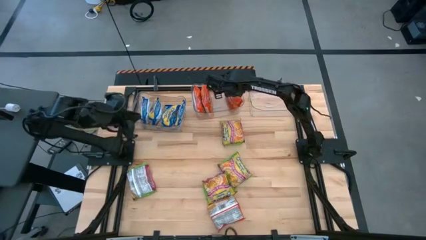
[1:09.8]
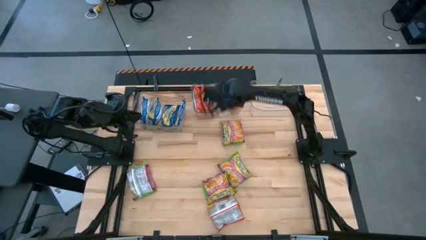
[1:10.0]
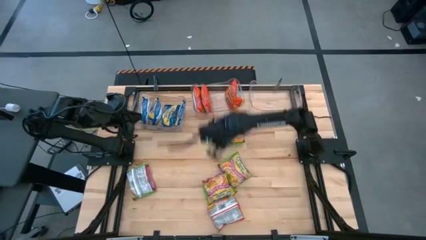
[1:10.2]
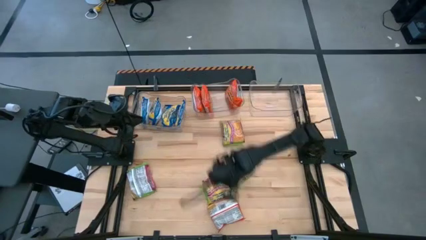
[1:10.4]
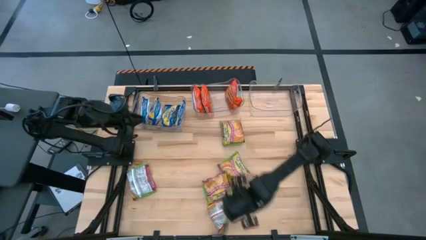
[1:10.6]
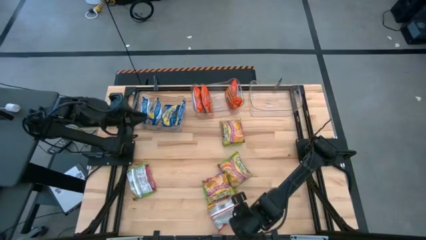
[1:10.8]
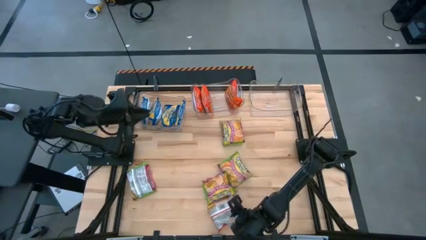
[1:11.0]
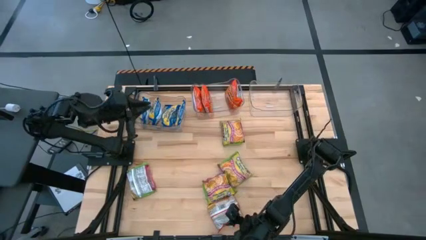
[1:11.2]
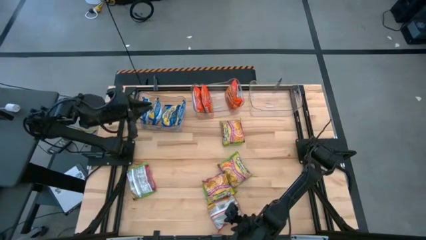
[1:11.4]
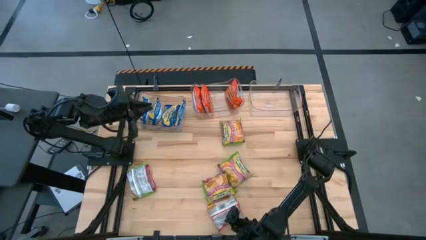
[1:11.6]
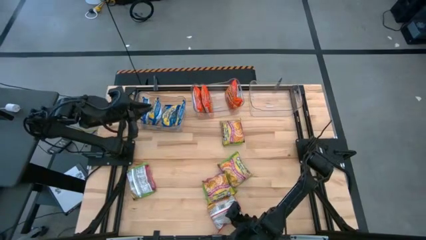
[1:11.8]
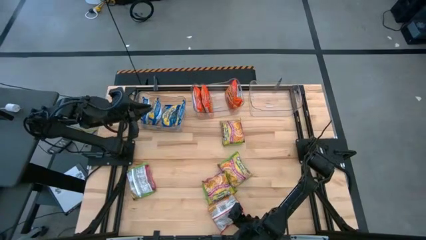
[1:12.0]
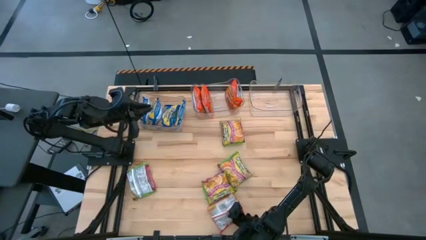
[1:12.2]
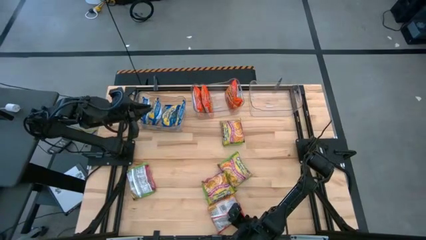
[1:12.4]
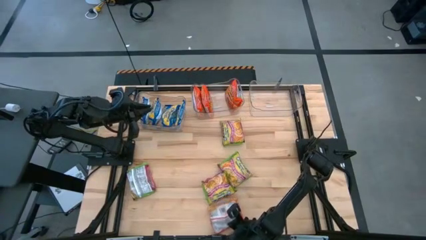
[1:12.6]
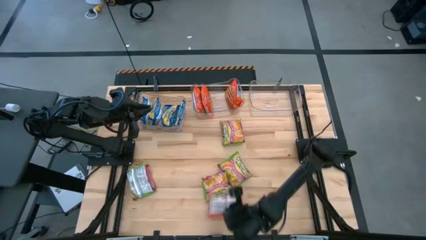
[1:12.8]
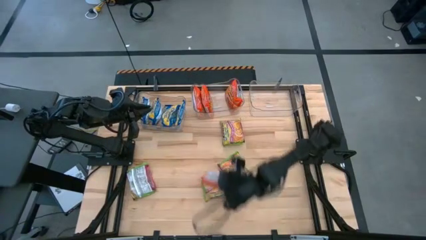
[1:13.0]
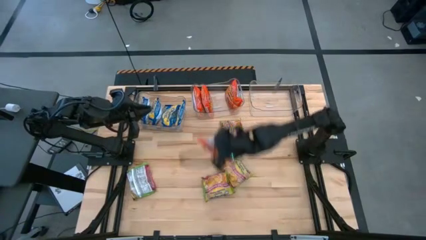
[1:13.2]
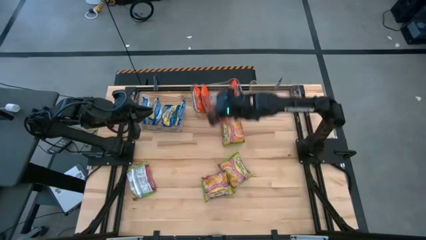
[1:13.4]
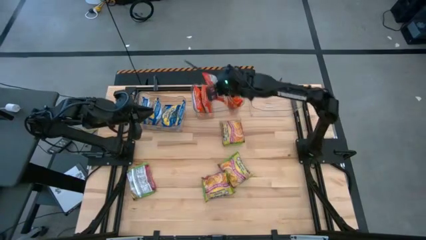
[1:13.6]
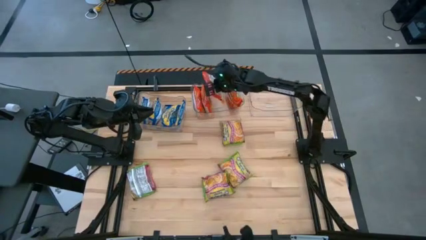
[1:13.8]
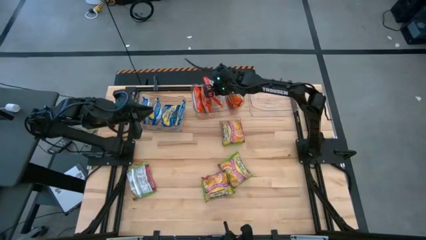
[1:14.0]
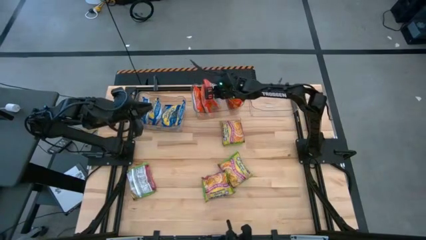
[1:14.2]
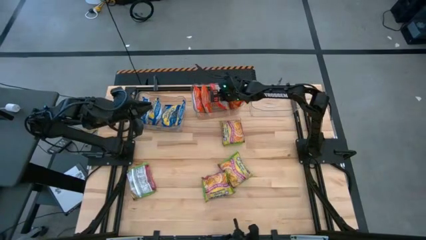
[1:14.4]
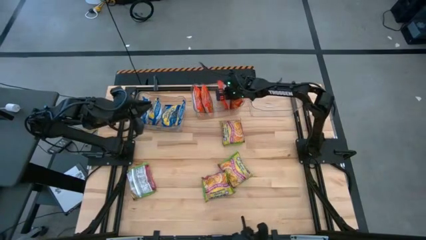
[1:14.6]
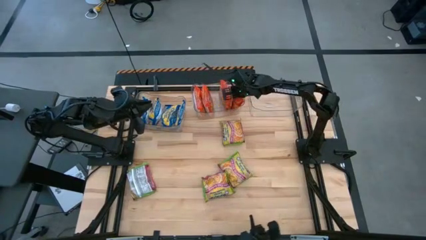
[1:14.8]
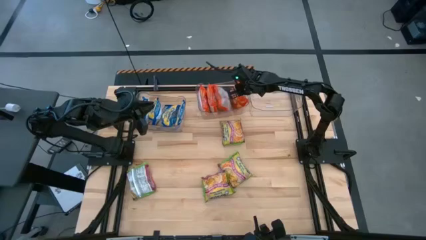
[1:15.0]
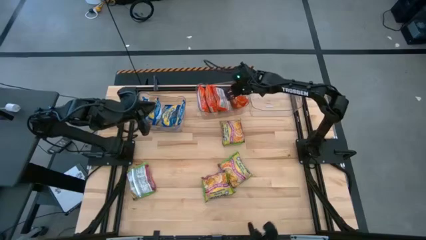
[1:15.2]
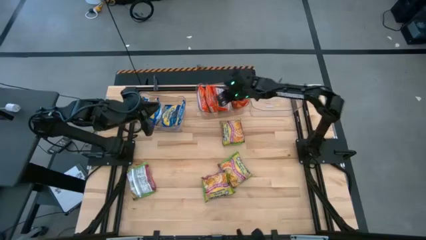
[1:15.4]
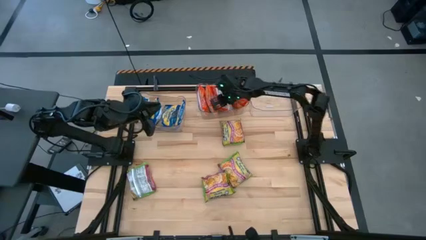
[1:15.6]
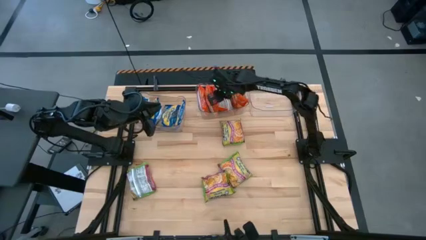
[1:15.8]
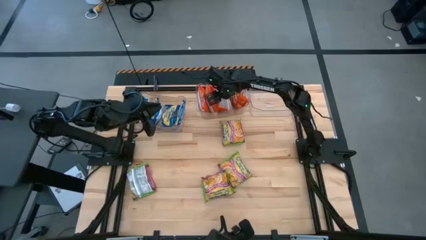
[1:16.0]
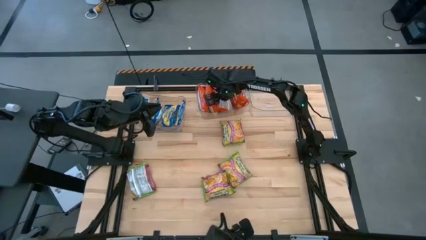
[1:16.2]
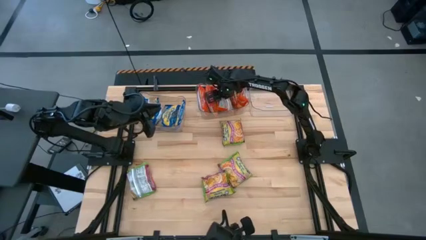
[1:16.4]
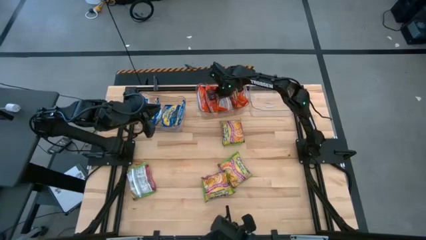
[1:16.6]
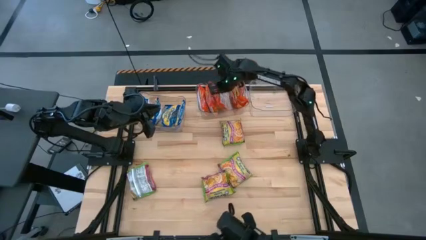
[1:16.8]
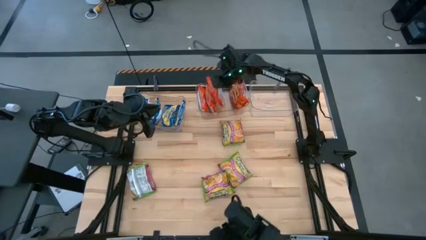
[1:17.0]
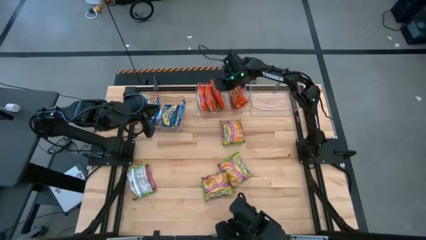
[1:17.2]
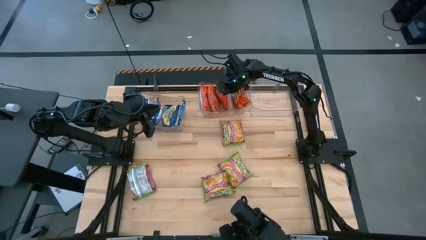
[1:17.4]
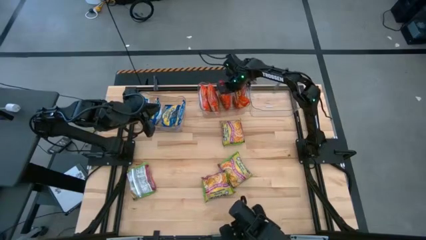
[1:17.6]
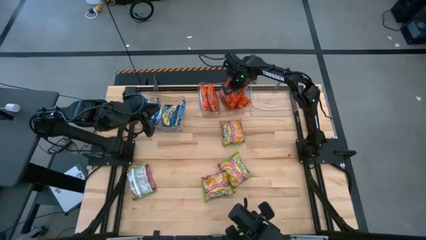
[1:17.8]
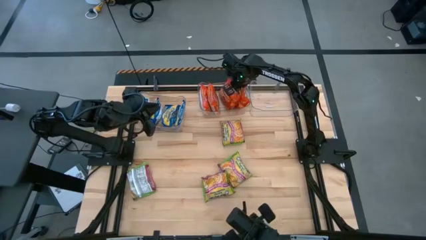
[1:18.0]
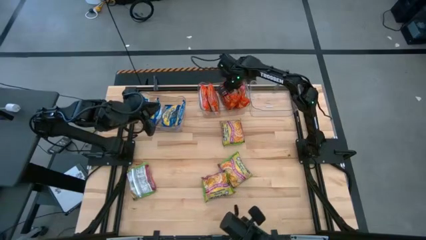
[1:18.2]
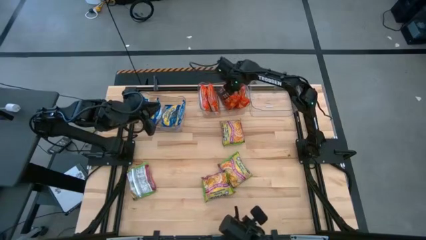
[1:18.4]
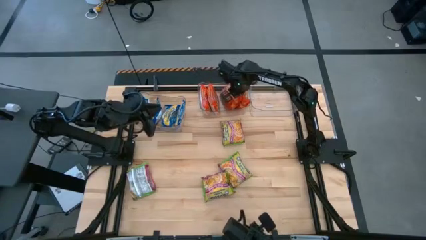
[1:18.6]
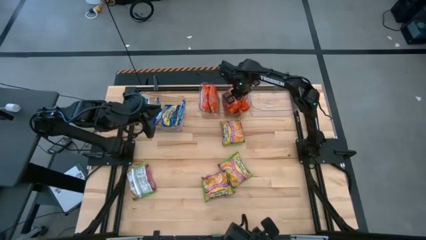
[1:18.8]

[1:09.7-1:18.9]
Task: Sort Maruchan noodles
Put the orange noodle pack into the middle transparent bin

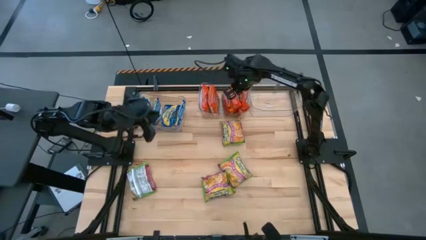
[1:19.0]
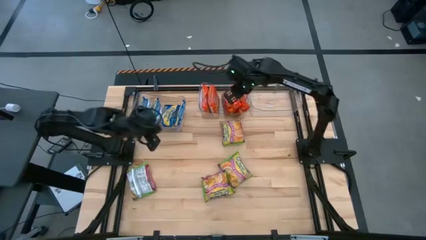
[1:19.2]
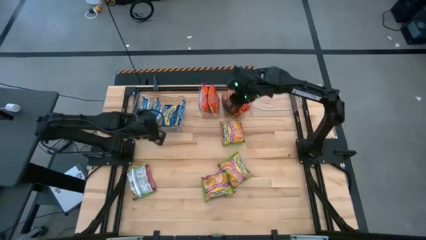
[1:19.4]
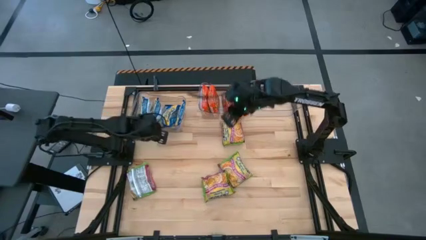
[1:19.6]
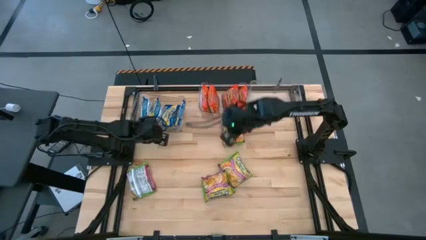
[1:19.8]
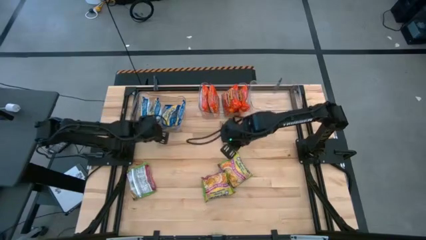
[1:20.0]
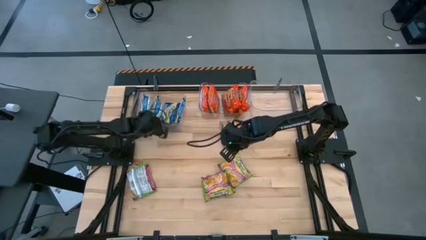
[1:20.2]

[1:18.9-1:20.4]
Adjust the left transparent bin

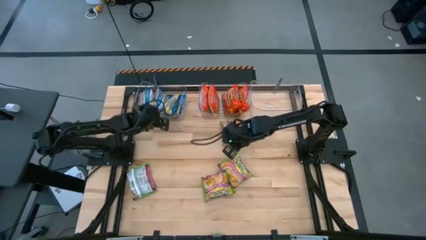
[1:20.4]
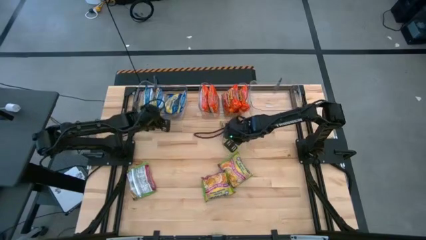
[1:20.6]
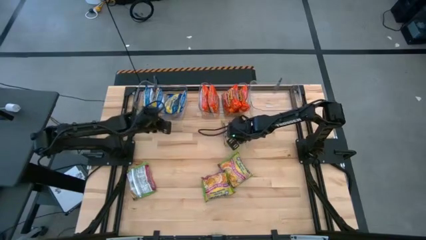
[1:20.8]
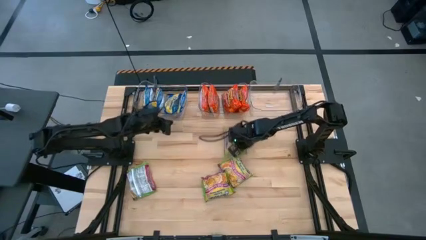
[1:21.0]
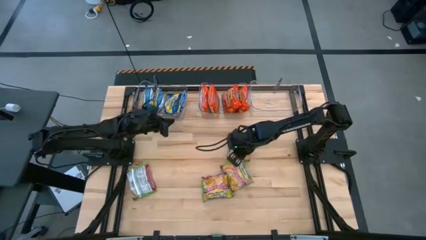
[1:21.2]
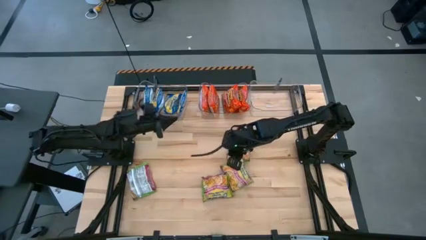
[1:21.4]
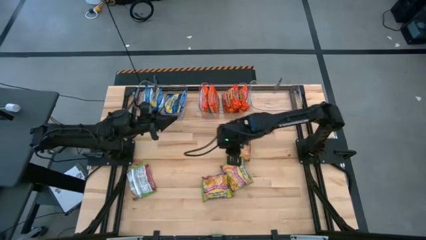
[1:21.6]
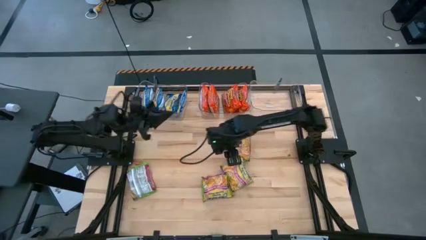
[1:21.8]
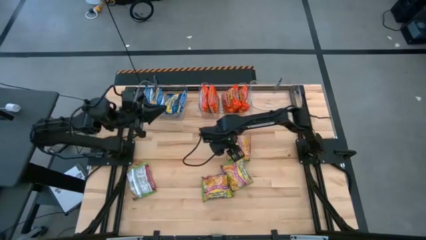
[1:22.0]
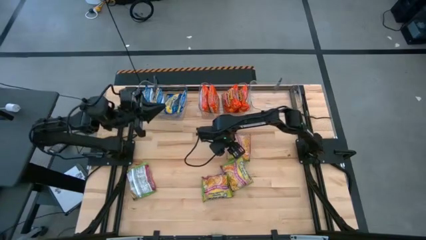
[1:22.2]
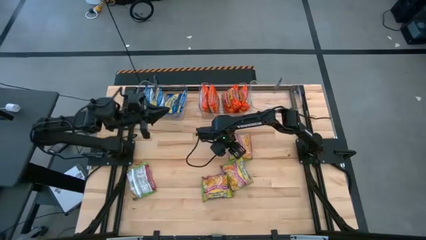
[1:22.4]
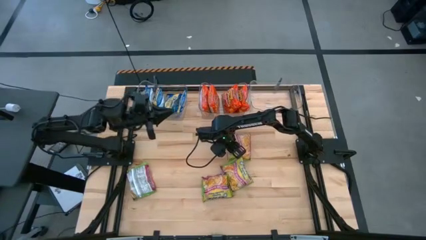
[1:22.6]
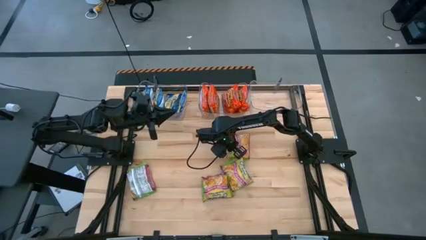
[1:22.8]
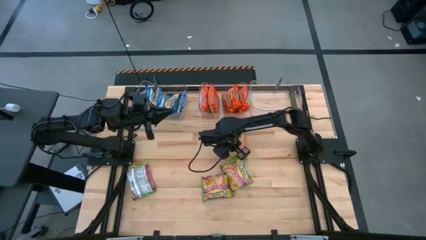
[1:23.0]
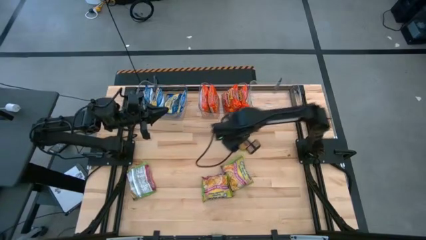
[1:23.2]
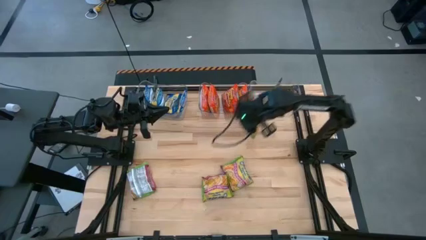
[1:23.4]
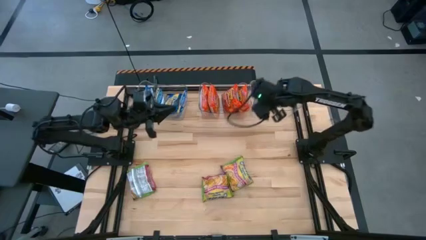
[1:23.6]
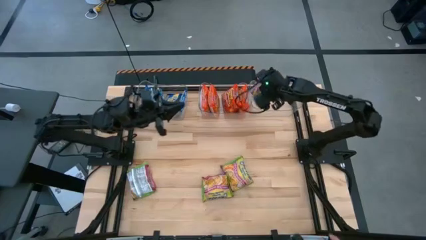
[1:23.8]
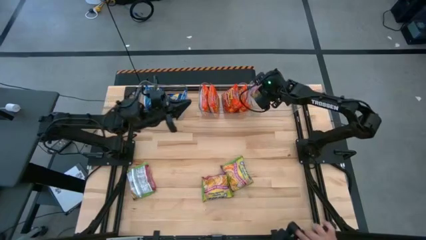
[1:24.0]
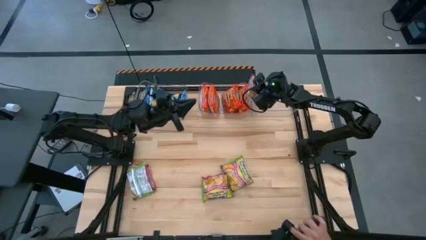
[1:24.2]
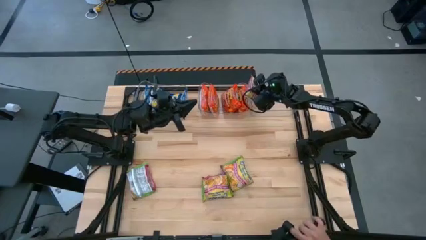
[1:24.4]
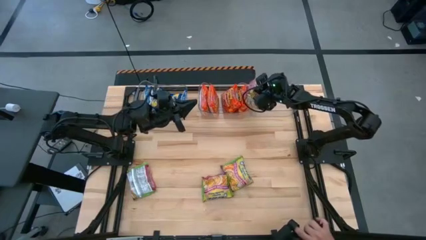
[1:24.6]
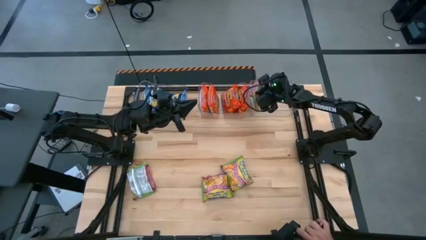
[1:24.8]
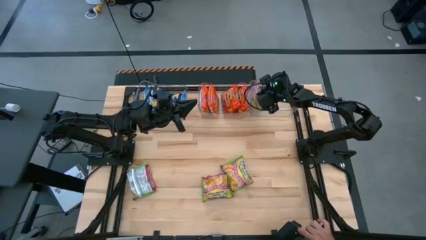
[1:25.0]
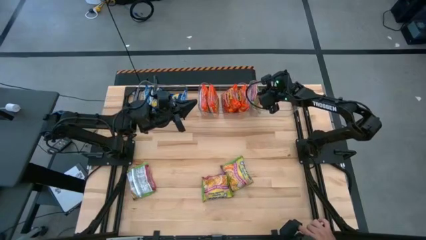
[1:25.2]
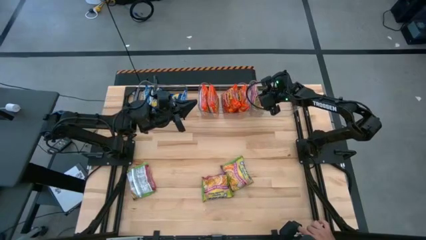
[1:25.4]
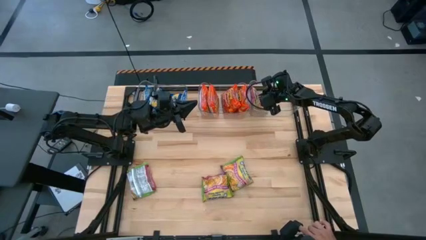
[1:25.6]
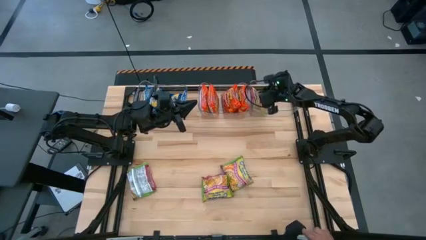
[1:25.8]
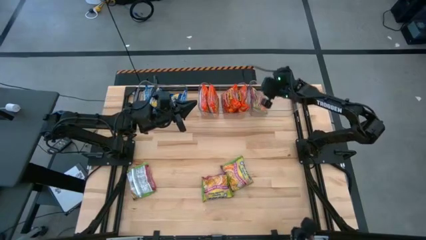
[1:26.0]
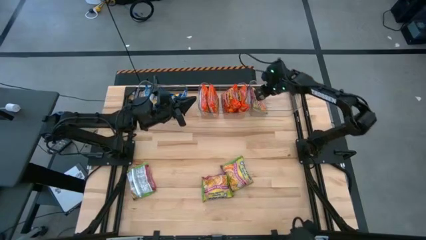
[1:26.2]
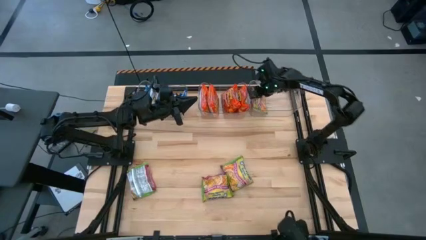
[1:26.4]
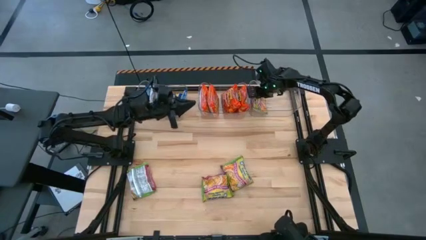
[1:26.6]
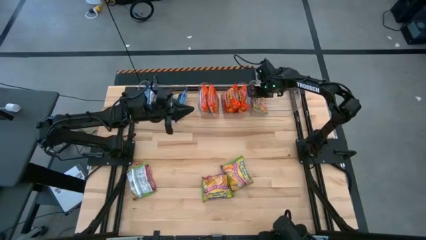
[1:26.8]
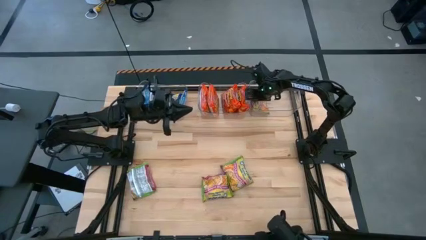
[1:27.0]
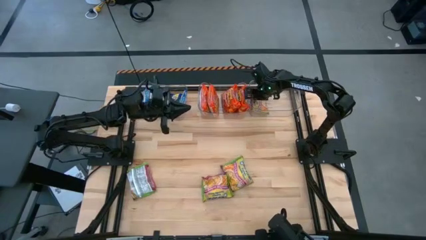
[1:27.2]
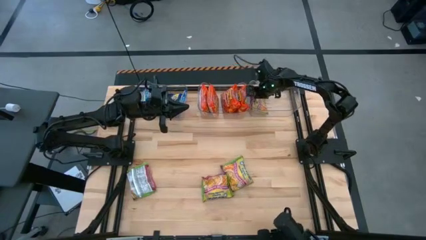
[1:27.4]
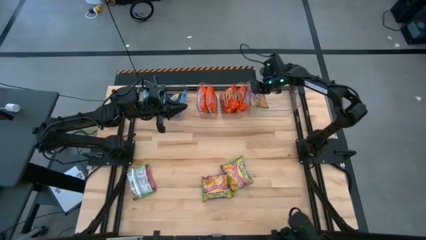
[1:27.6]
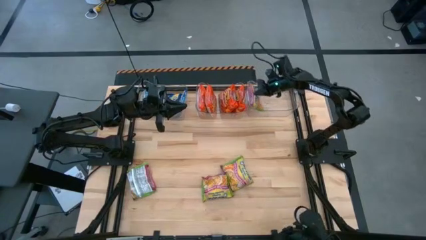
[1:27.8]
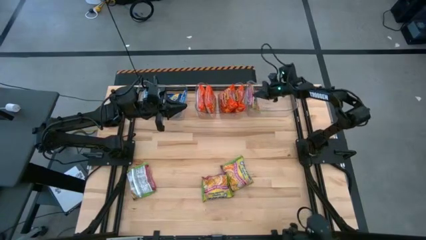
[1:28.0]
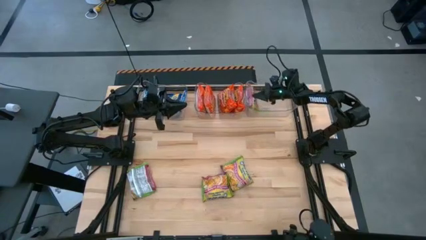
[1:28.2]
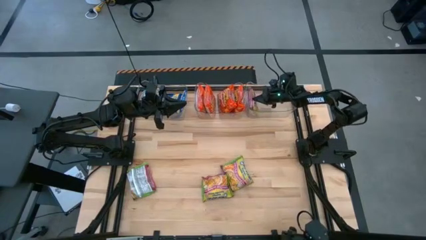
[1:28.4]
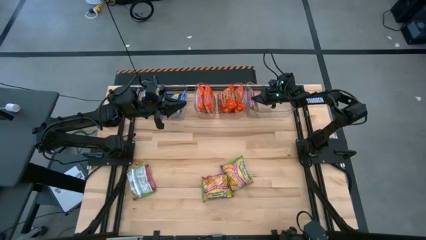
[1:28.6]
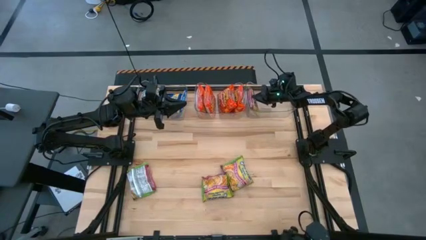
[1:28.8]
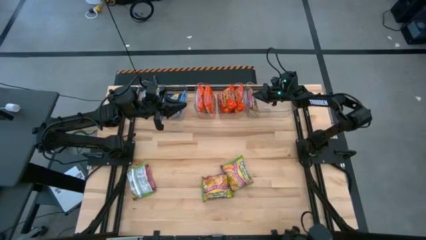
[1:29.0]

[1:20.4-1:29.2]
Put the green noodle pack into the right transparent bin
